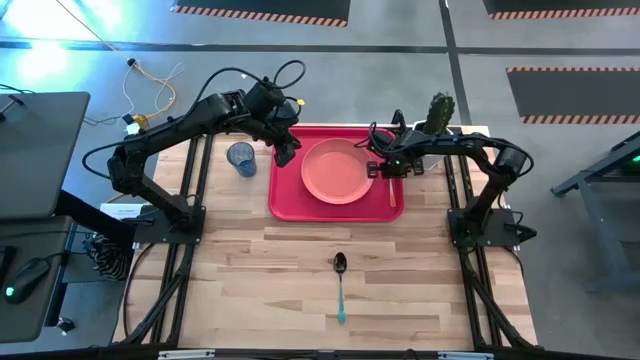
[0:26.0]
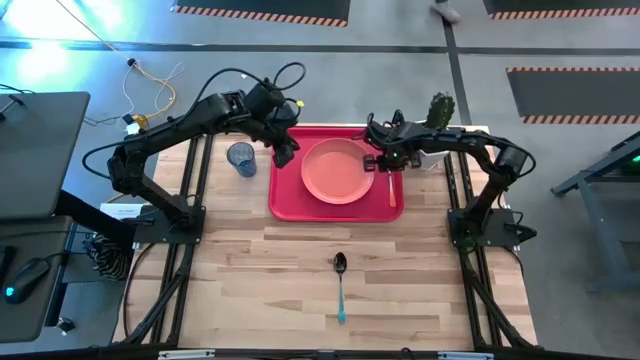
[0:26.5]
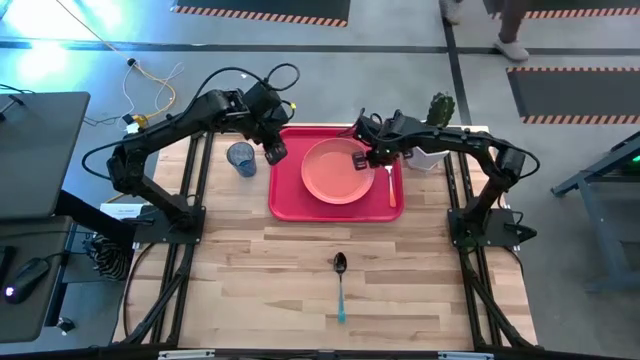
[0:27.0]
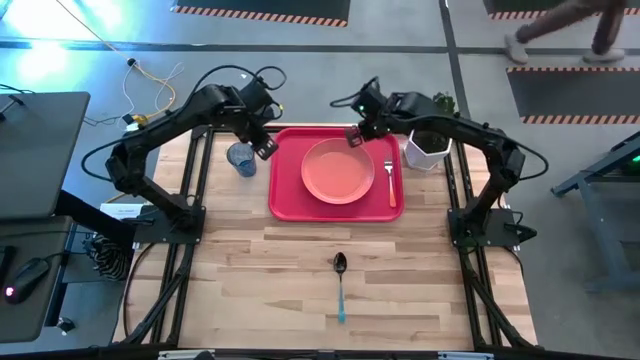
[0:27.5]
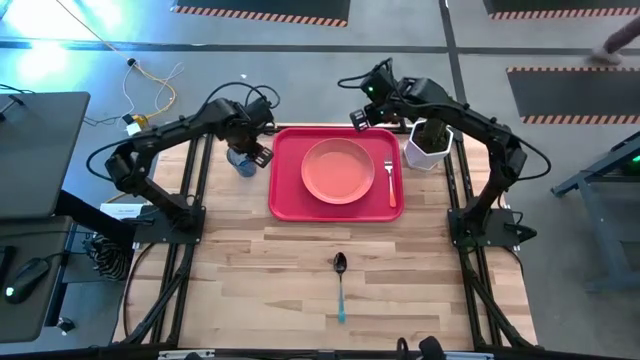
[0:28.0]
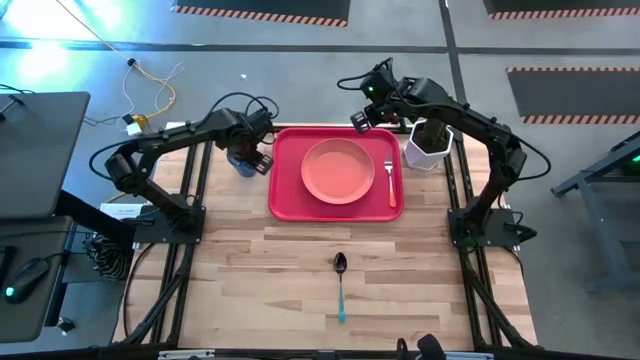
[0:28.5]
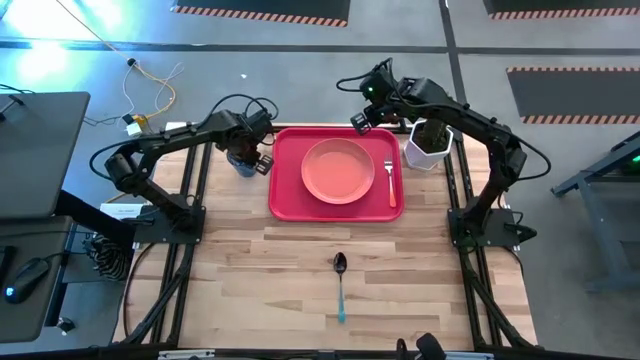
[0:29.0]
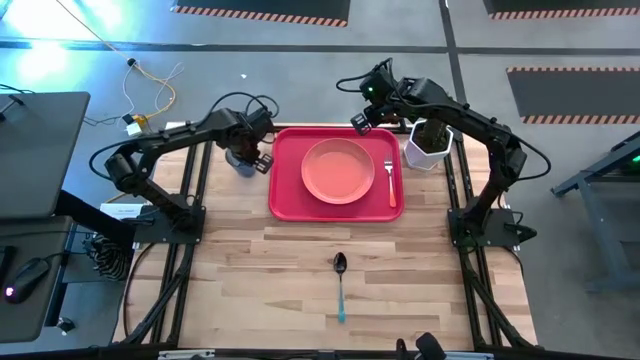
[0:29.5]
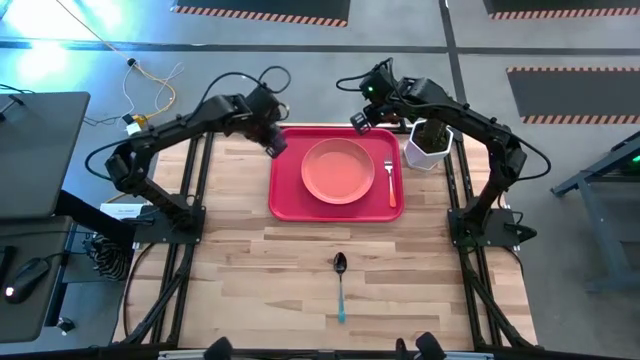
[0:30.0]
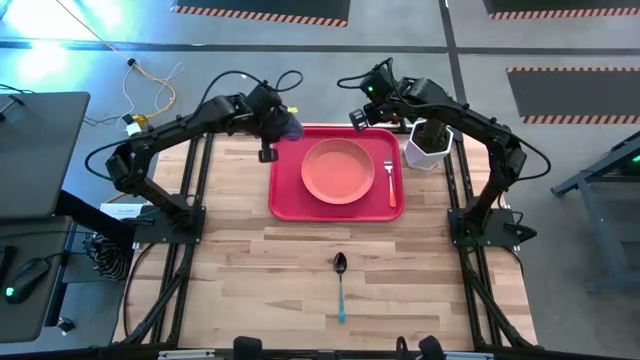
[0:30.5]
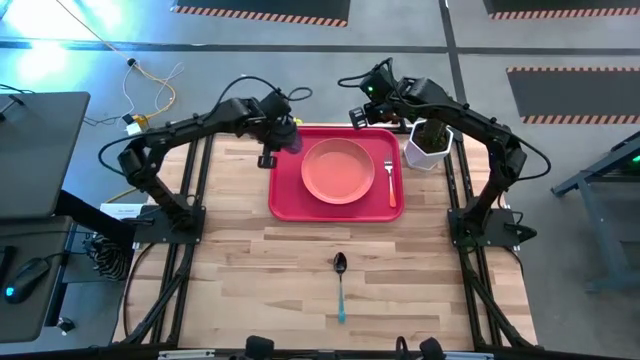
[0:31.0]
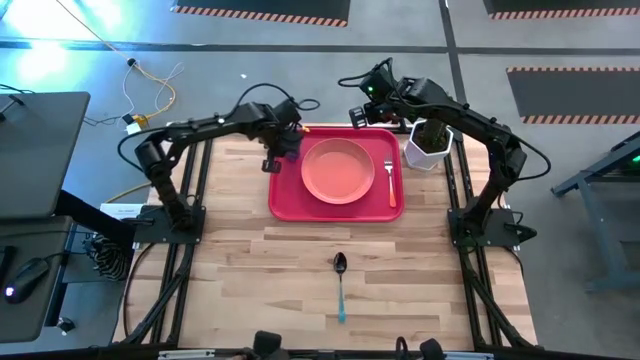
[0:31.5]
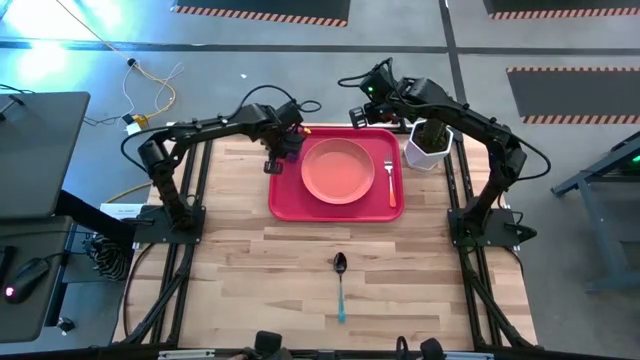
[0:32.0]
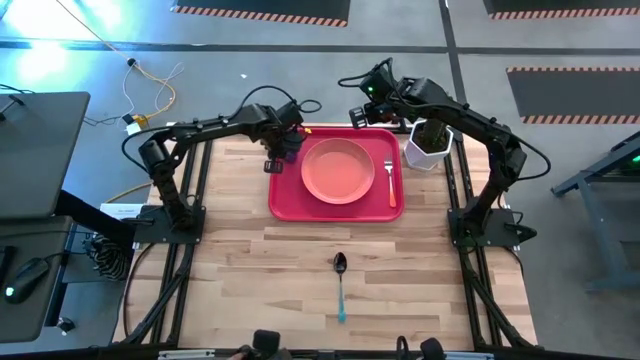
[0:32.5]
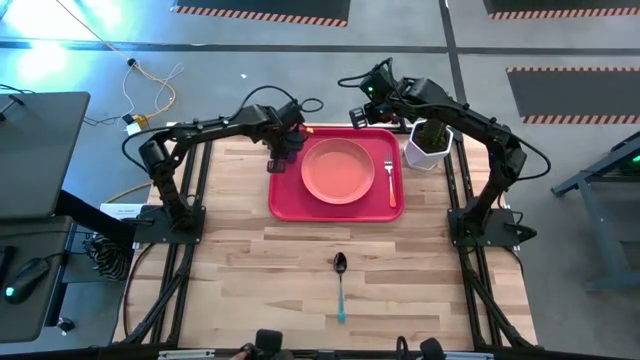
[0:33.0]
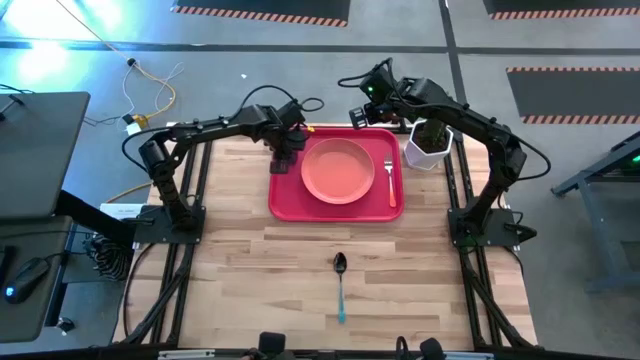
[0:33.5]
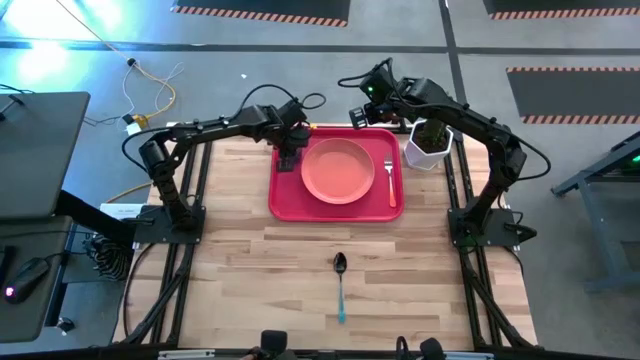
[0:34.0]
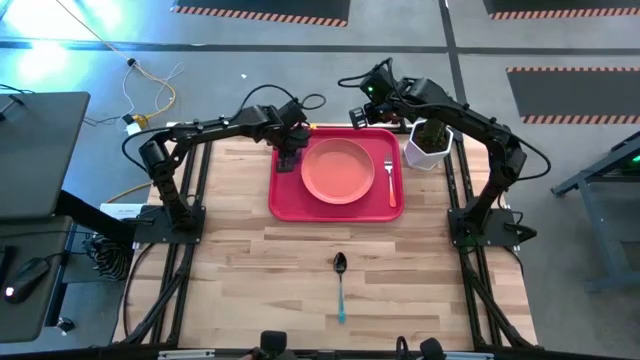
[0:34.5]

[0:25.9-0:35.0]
Task: Pick and place plate/cup/fork/spoon on tray
Put the blue cup on the top left of the orange plate

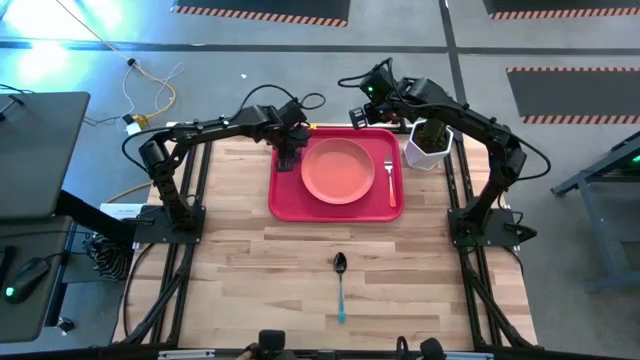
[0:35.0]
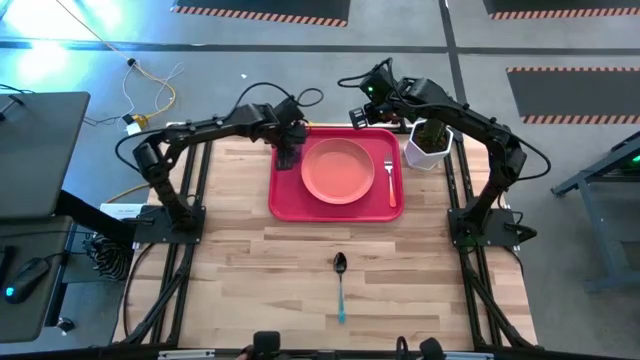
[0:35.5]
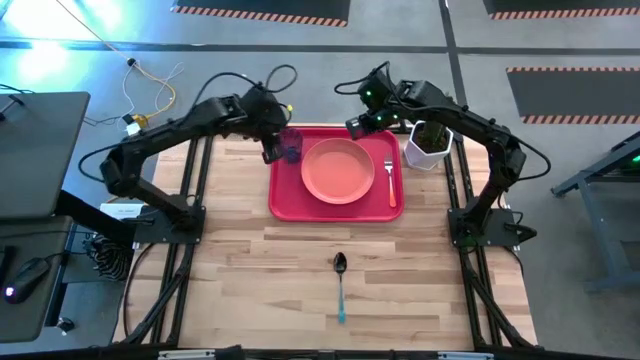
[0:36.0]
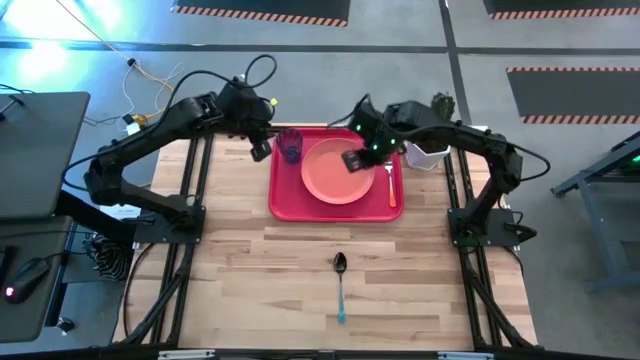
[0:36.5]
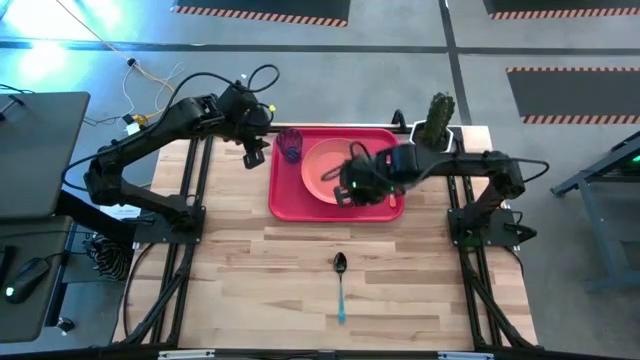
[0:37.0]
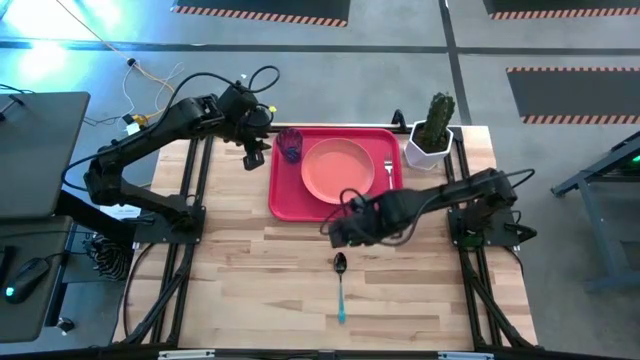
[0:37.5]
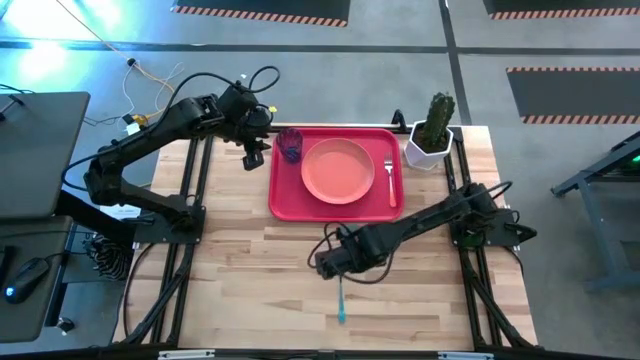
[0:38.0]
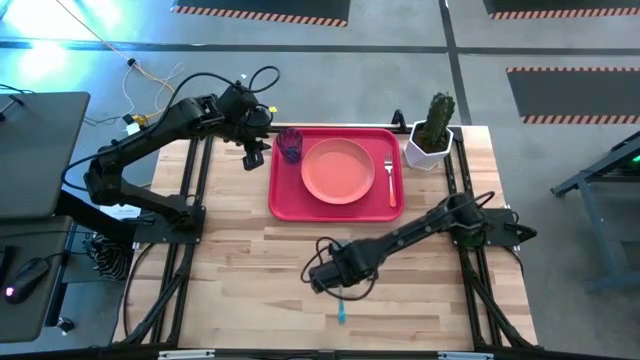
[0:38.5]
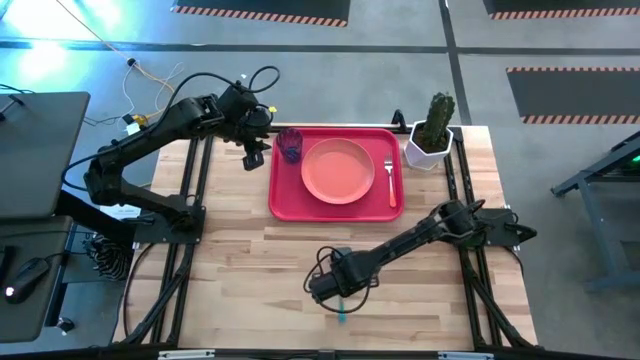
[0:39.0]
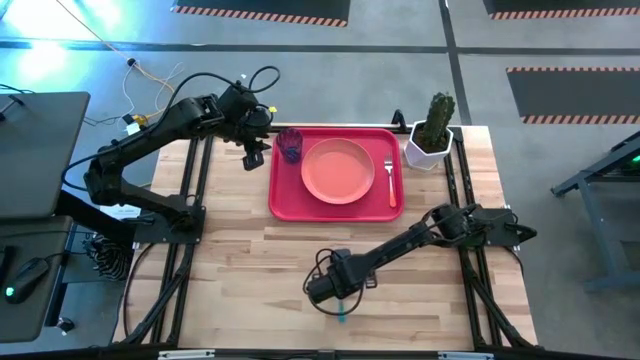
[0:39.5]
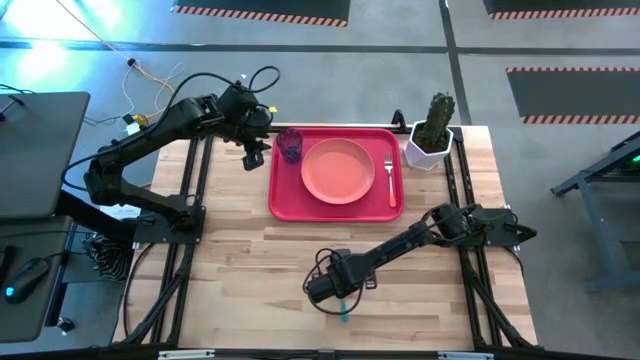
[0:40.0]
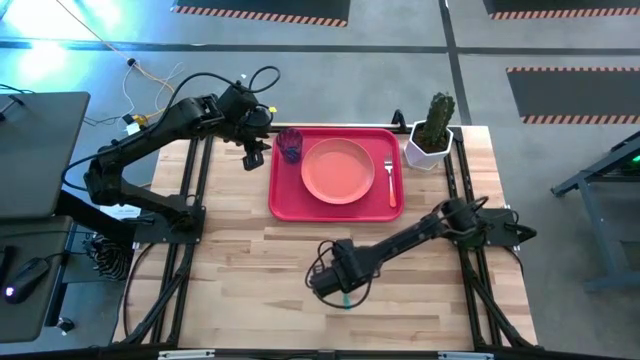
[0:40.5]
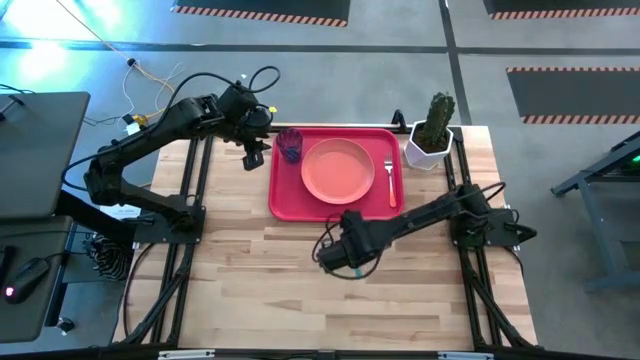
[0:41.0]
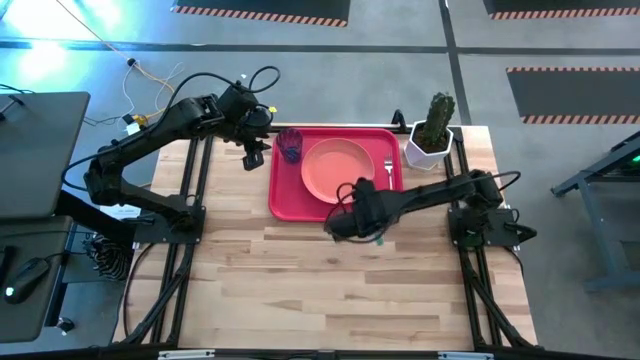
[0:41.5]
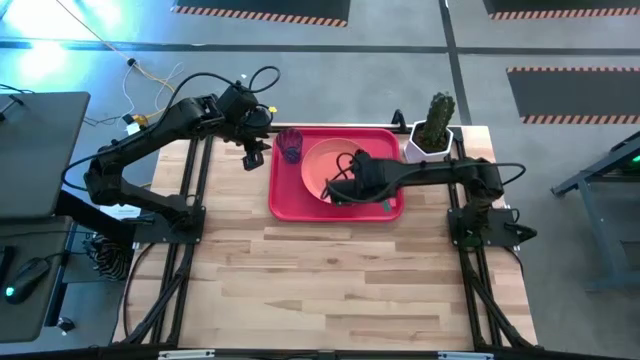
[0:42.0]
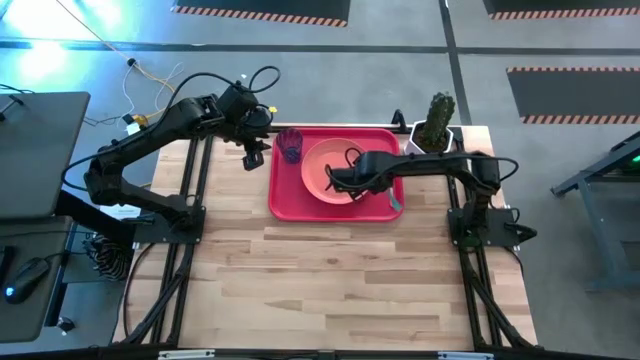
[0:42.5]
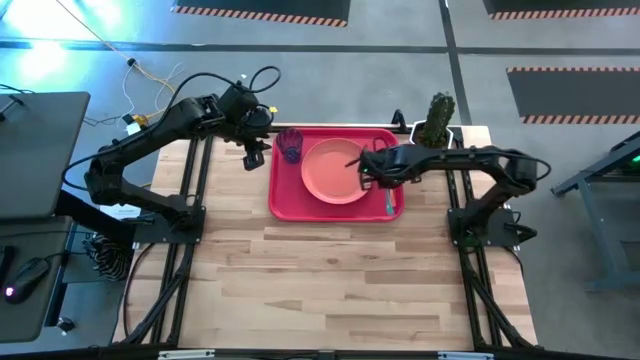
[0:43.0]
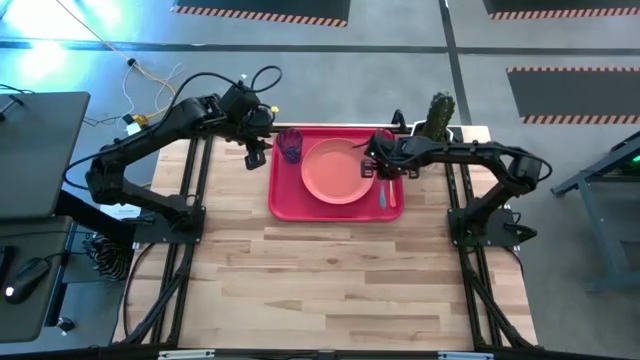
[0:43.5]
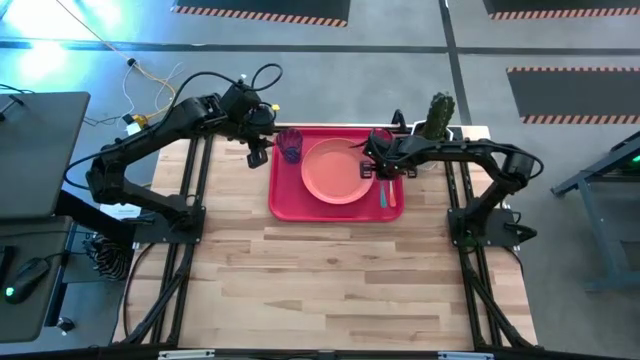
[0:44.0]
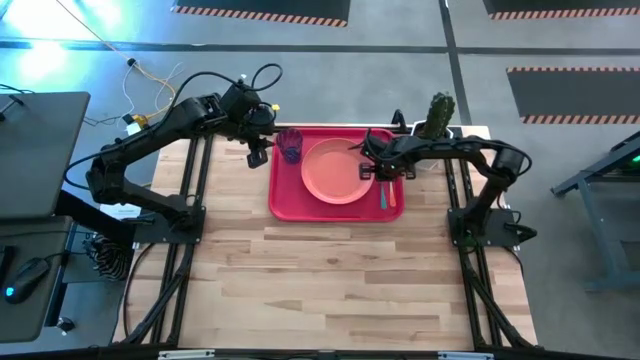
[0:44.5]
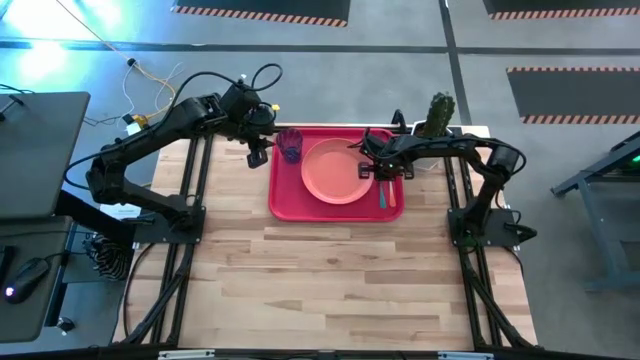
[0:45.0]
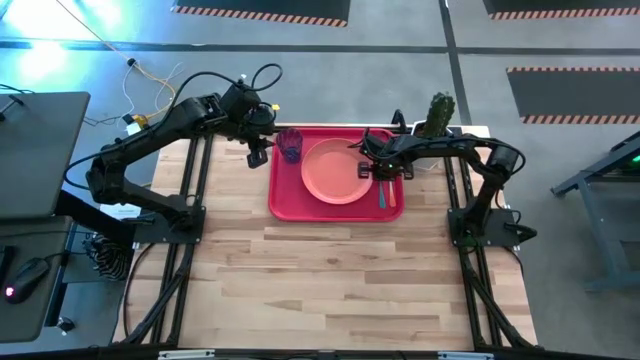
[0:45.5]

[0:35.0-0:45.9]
Put the blue spoon on the left side of the white orange fork
